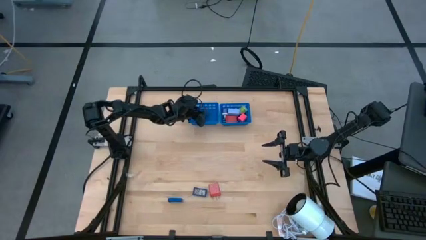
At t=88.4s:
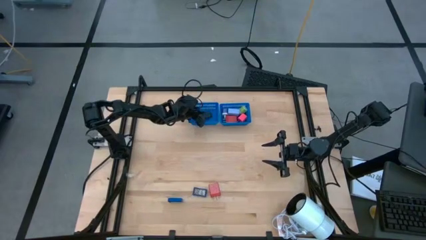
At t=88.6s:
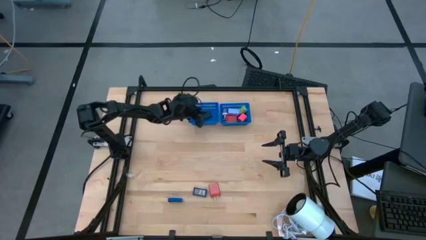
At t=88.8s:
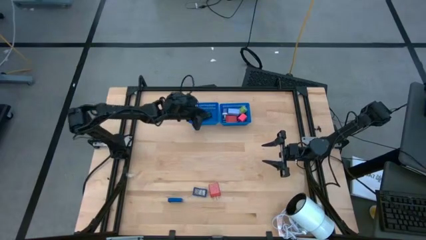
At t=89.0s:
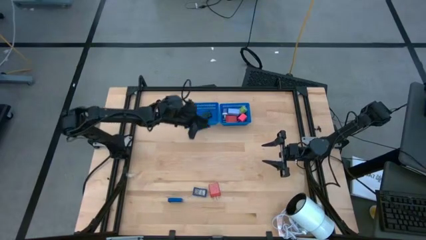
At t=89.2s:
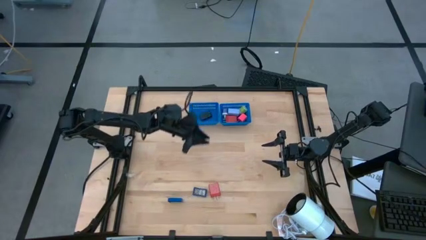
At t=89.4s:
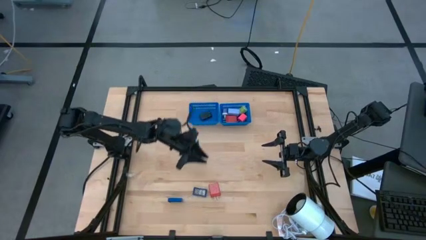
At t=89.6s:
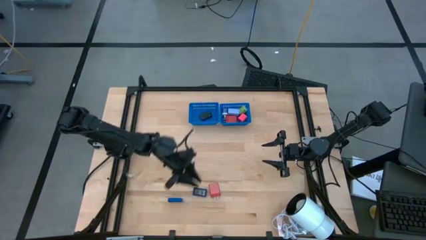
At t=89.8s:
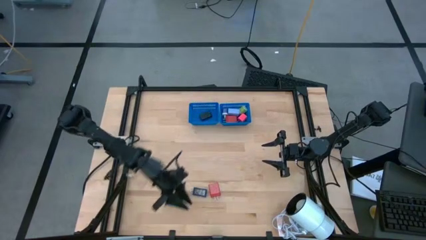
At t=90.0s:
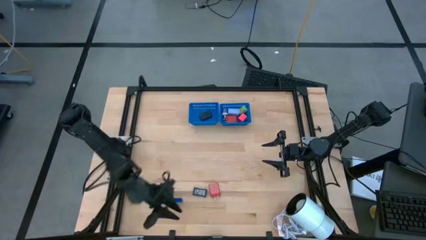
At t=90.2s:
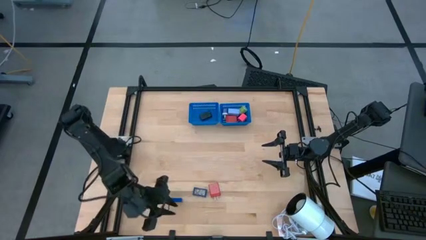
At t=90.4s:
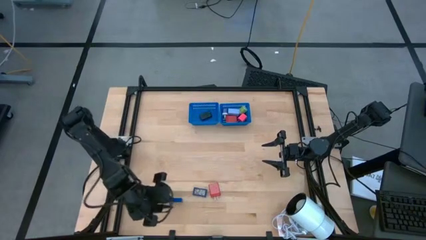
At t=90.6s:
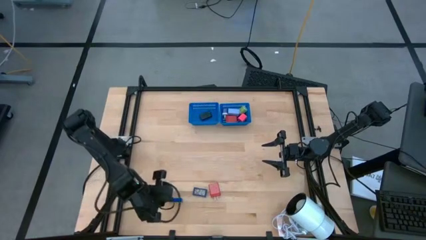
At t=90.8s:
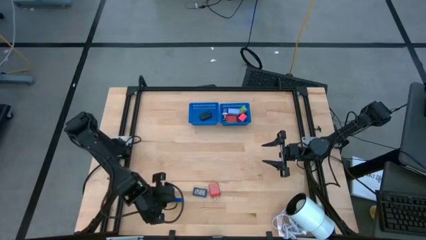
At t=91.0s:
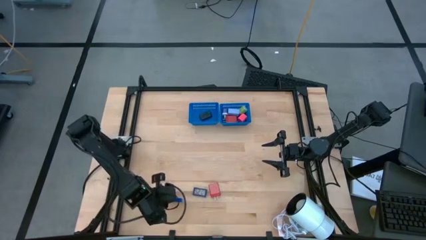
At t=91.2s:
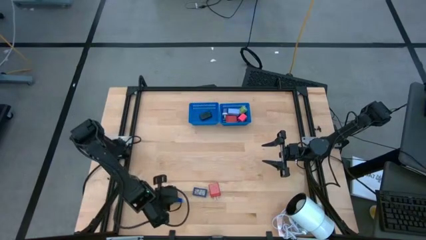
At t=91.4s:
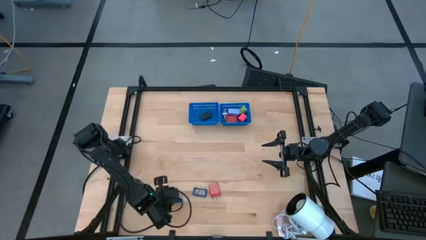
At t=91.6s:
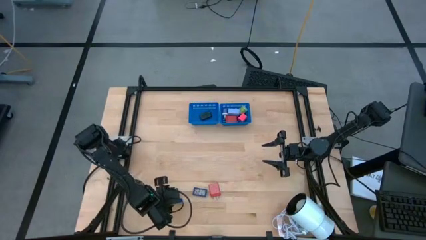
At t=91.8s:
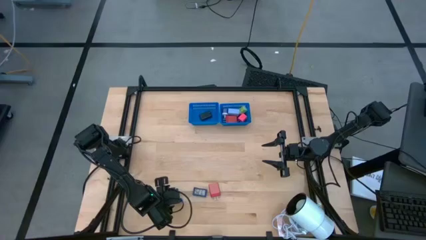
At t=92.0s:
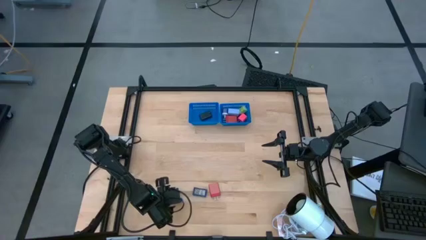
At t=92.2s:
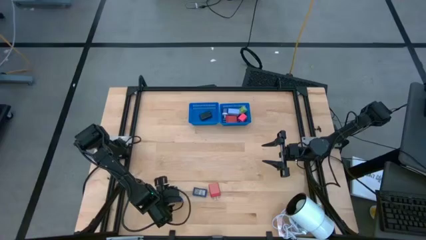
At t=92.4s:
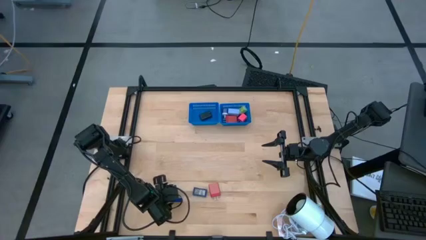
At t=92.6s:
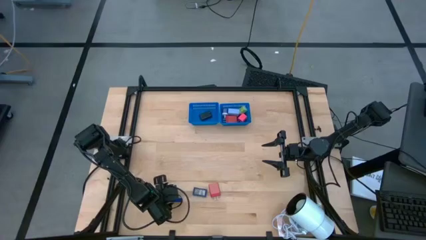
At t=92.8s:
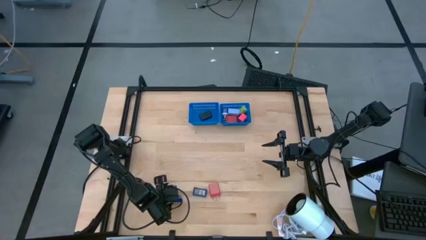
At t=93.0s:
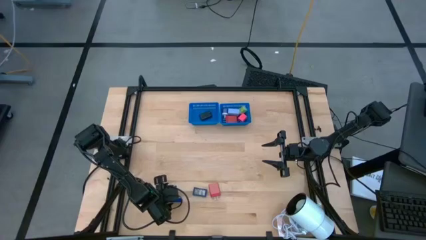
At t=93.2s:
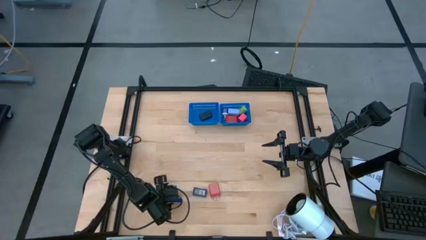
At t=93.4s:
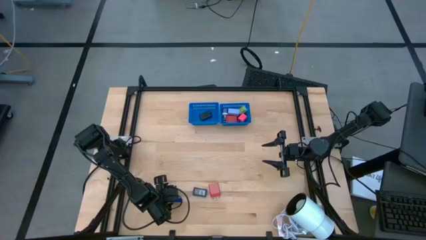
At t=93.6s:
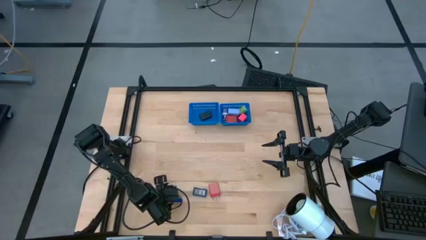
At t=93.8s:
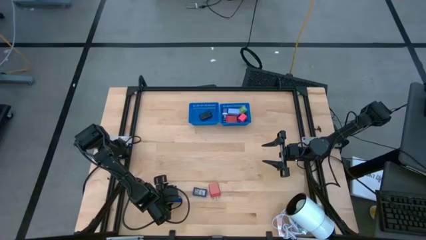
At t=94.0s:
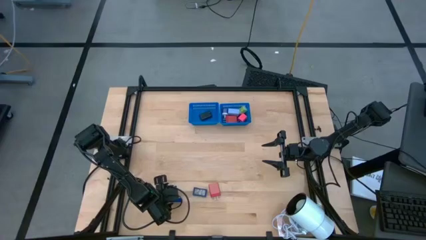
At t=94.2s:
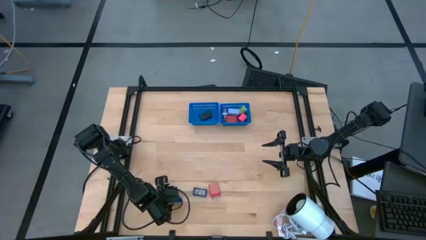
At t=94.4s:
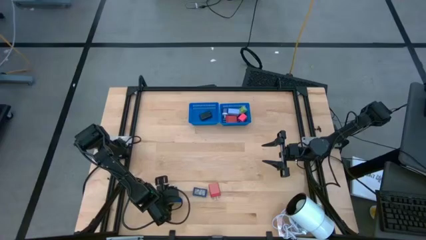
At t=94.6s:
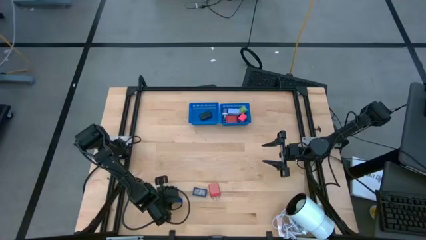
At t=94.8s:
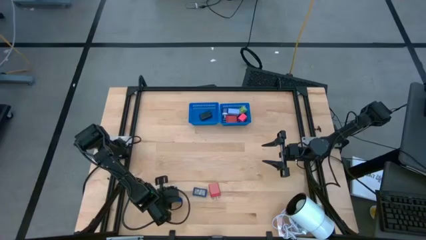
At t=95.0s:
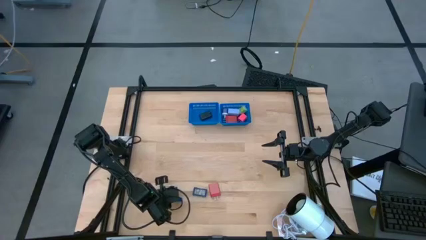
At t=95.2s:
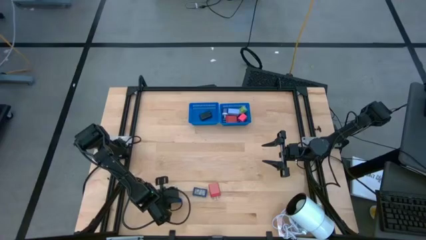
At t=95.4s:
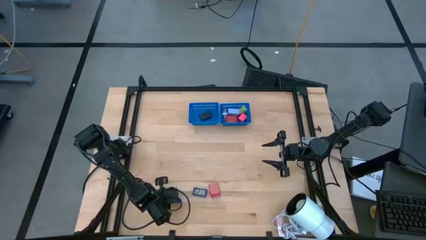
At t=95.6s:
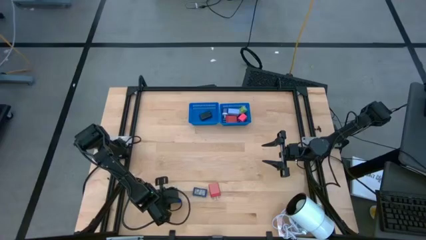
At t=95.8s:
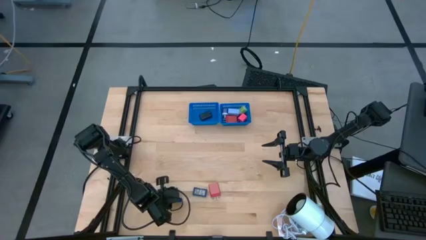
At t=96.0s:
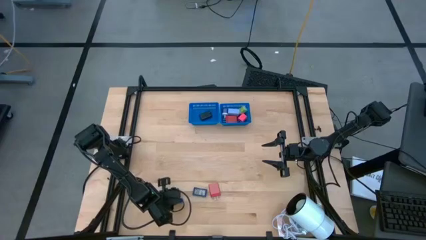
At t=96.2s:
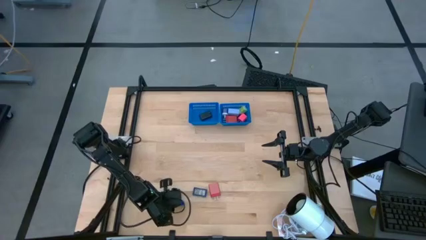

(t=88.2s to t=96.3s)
Task: Pick & Place Office items
Put the blue timer into the left blue bin

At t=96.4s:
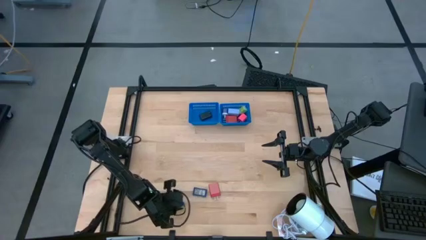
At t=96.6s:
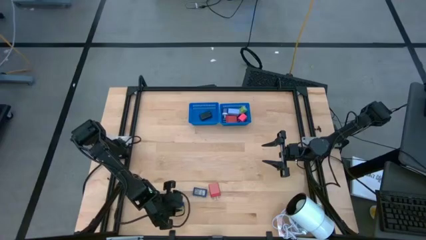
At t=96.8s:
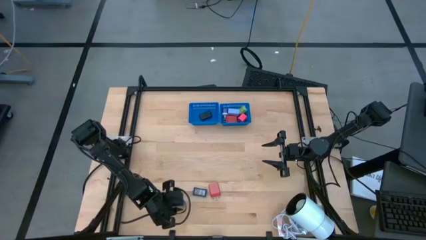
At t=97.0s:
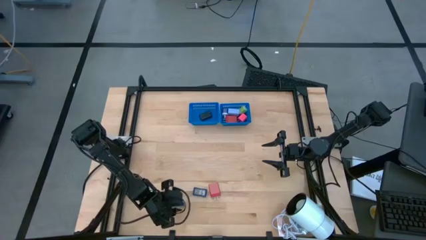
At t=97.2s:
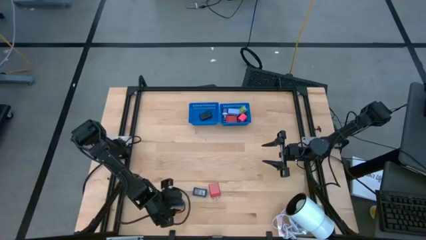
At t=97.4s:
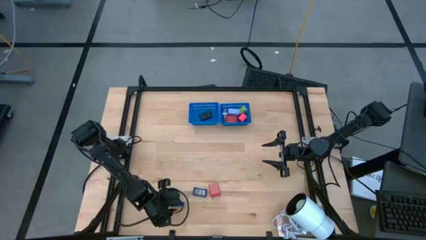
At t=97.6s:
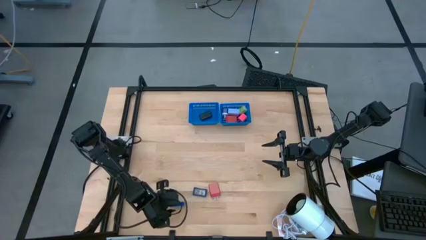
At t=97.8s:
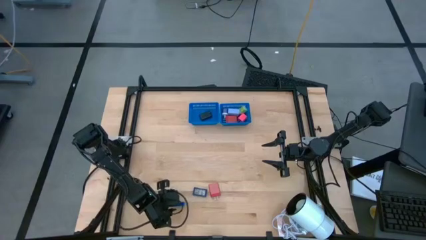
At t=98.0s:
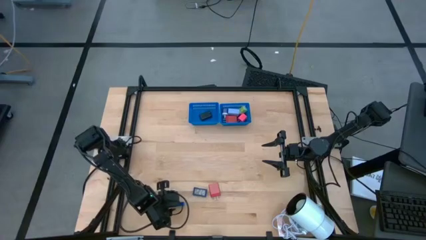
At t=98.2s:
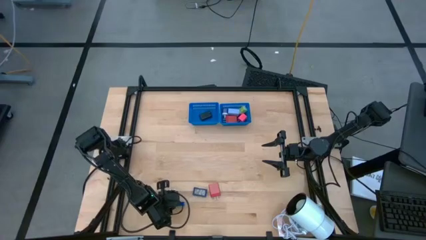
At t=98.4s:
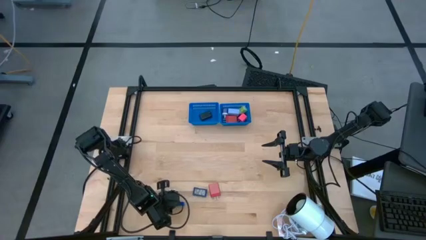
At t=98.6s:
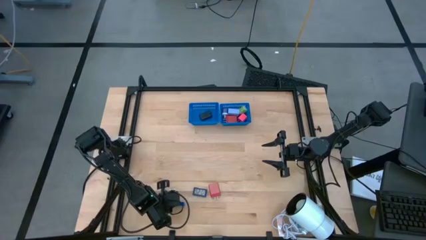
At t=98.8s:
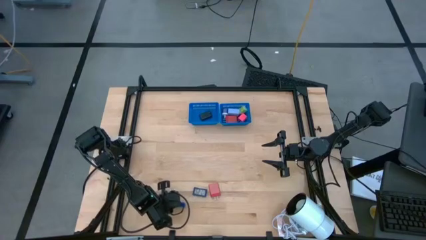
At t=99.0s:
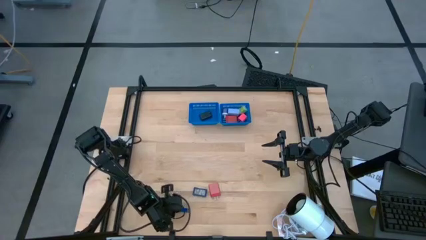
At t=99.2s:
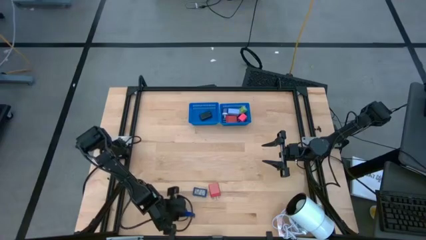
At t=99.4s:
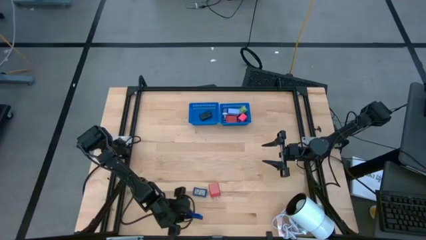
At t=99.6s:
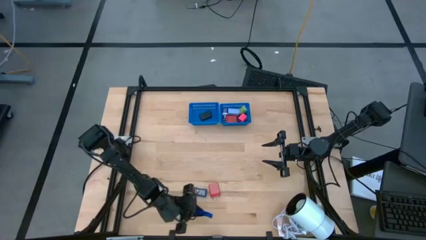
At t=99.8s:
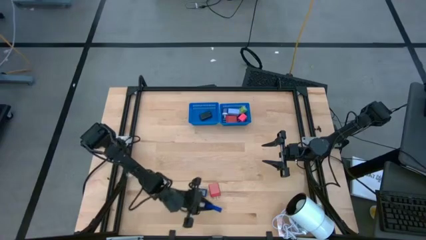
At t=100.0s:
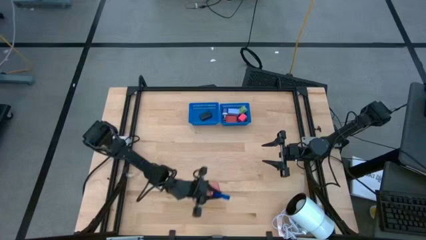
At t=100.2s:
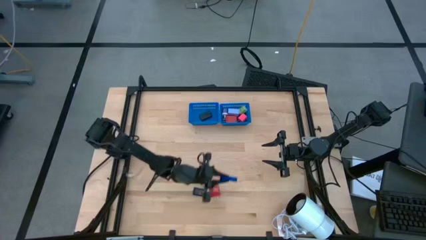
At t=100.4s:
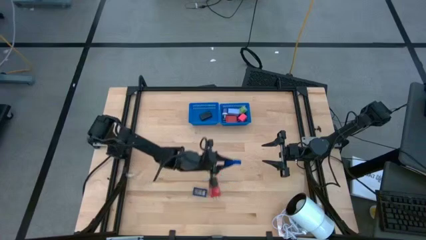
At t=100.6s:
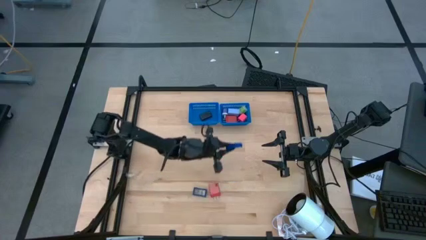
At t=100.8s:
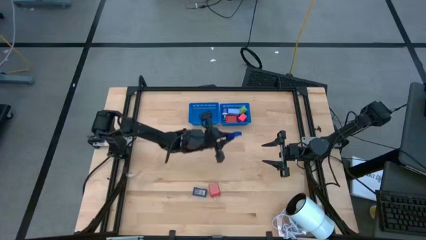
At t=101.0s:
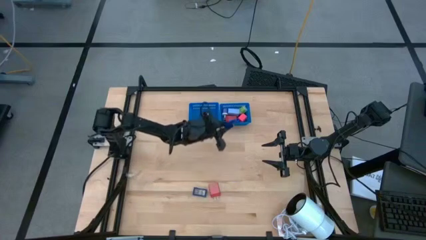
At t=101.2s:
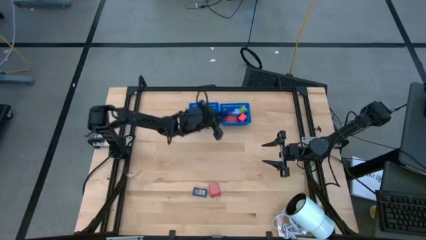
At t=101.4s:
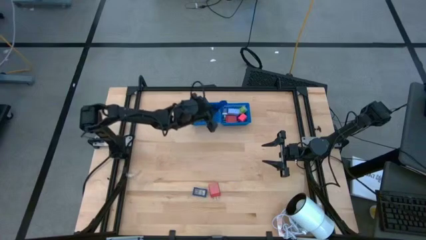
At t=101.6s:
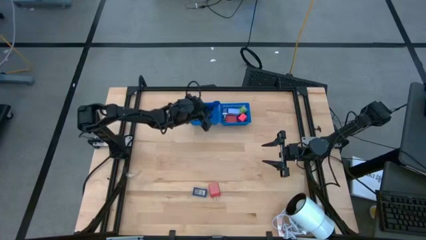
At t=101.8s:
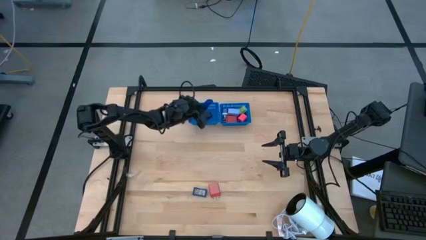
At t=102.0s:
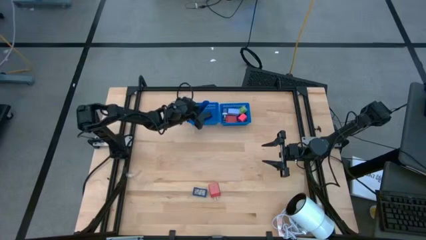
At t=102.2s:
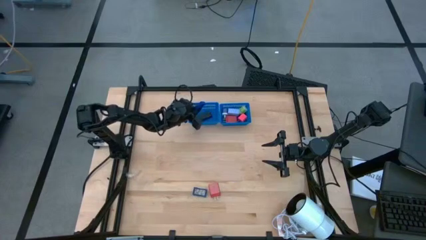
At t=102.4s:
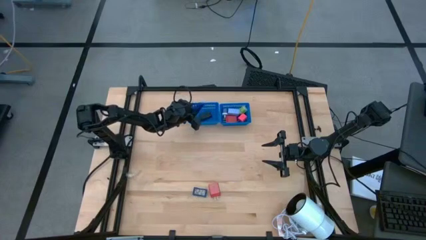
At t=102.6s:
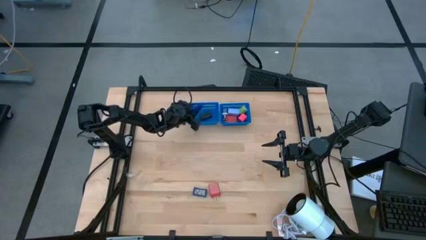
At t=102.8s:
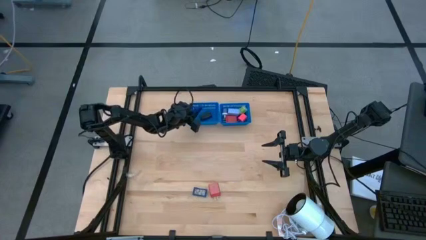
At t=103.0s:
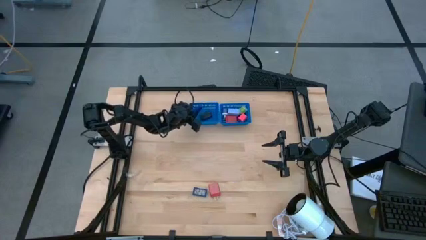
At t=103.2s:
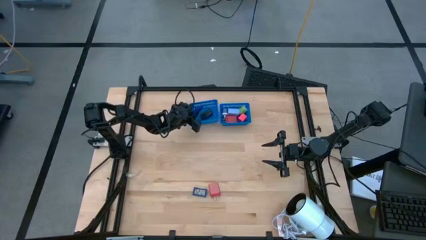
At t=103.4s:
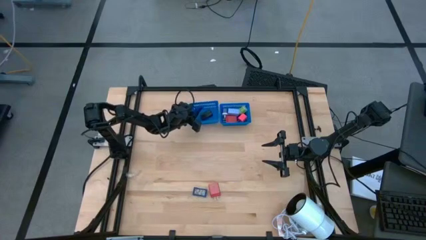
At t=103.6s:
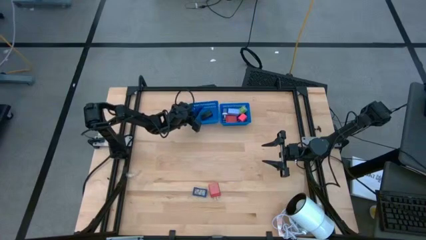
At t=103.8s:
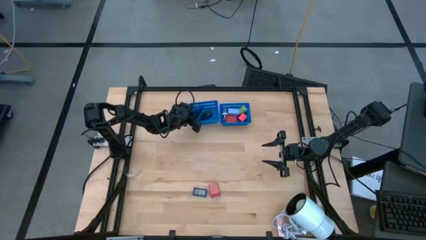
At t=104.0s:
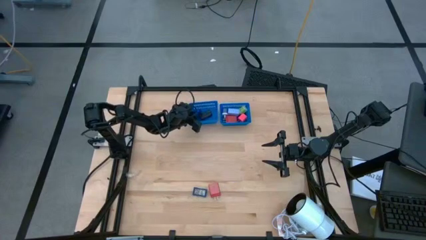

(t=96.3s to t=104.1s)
Put the blue timer into the left blue bin

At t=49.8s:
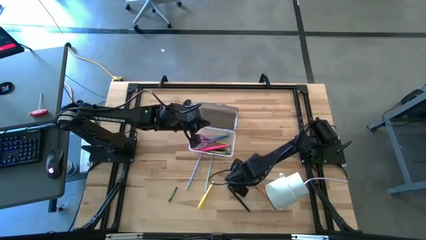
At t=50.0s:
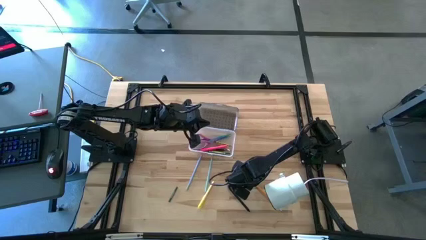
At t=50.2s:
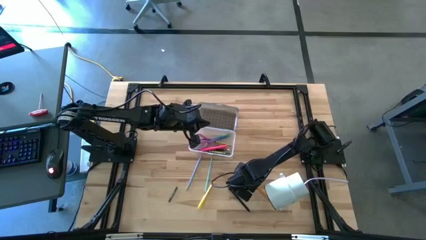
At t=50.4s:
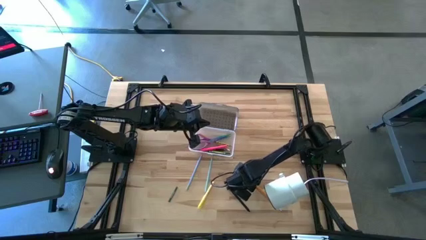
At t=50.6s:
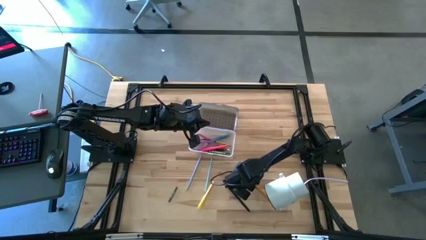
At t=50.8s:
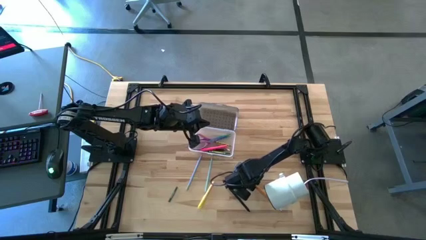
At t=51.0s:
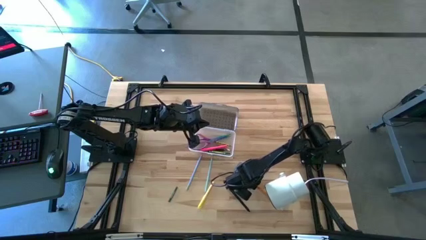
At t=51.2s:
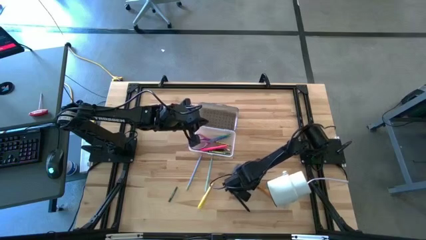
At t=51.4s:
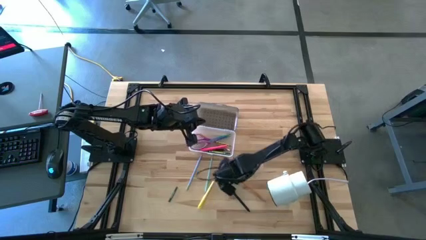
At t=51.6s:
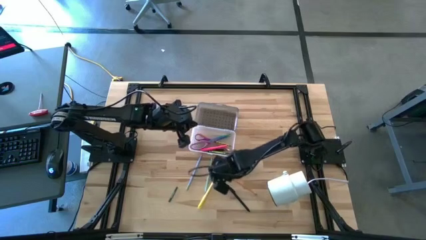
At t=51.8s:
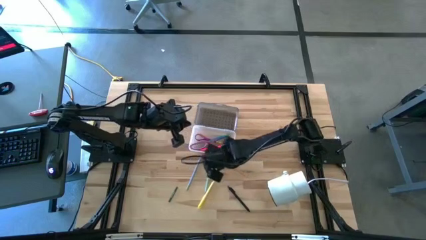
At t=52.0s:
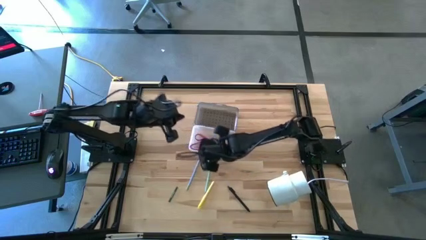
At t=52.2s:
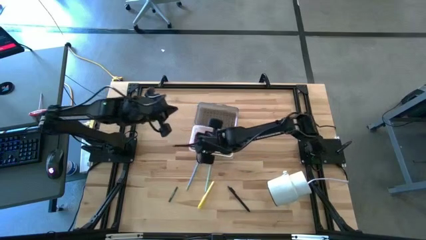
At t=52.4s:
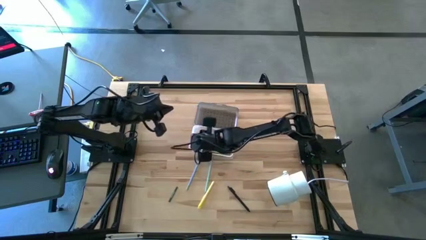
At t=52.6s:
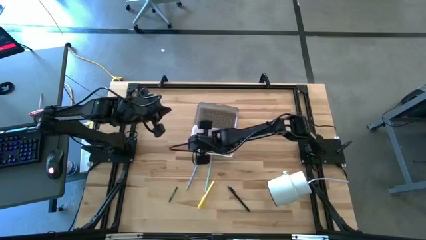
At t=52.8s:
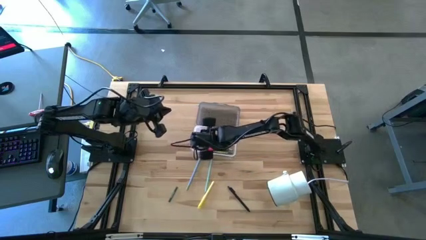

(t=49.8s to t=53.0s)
Task: Pick & place school supplies into a supply box
Put the orange pencil into the black supply box
